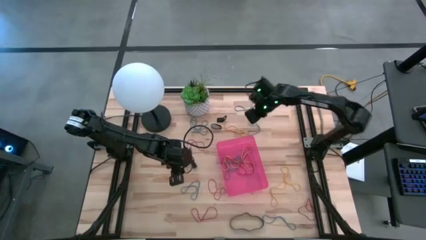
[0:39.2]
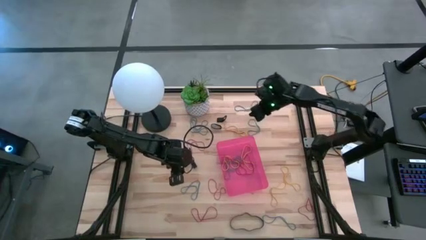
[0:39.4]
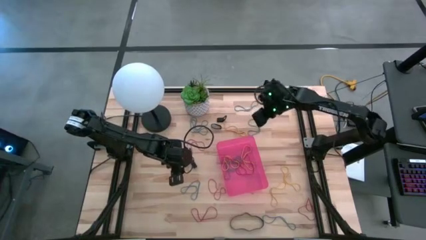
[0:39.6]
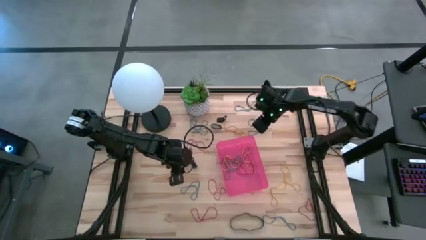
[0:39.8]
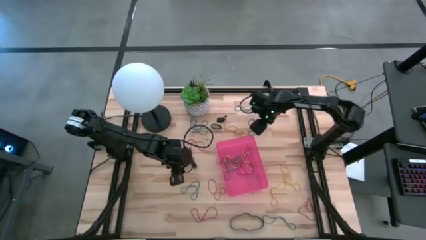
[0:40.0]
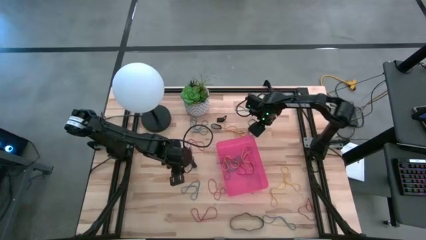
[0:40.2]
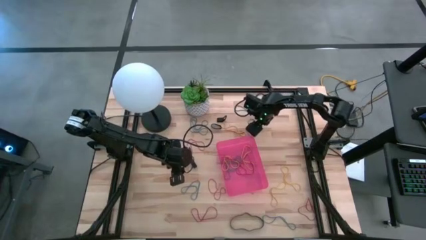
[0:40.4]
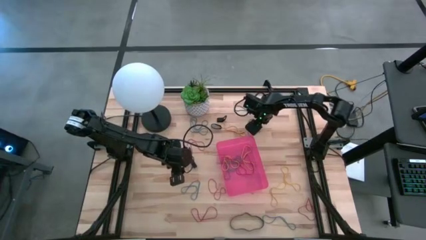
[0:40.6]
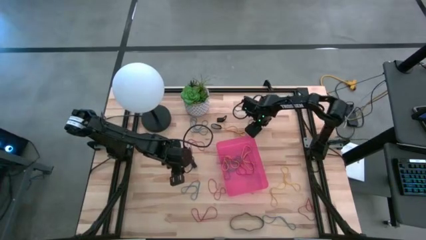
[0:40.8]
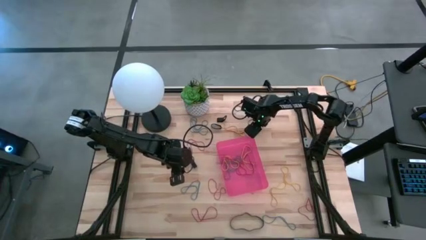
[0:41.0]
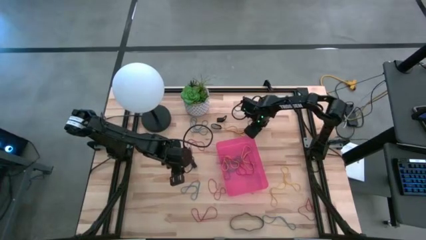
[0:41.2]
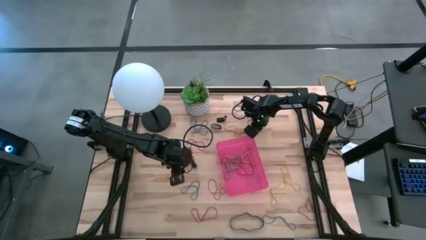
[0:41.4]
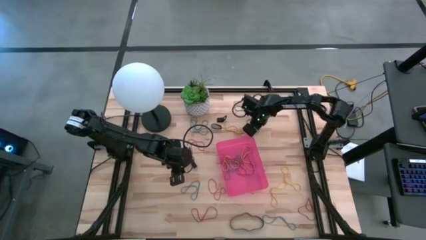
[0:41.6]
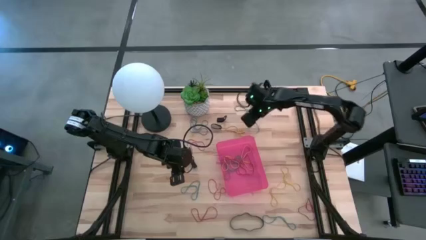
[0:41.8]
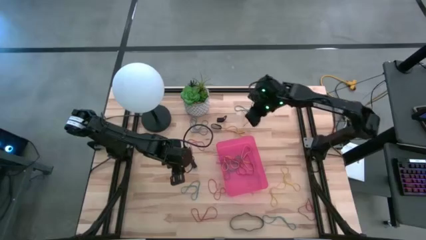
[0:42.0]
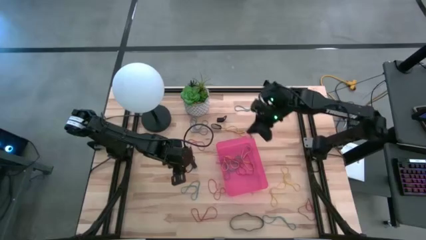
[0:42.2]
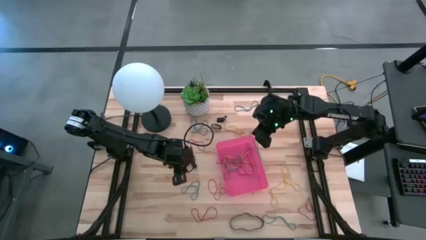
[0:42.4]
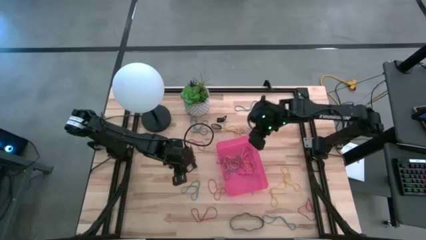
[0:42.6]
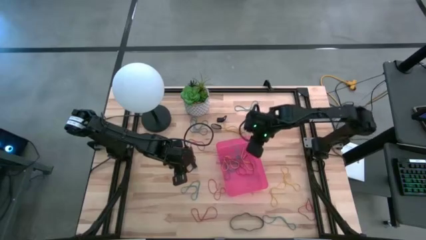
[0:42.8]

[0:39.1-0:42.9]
Task: Pick and place rubber bands into bin
Put the blue rubber band into the red bin

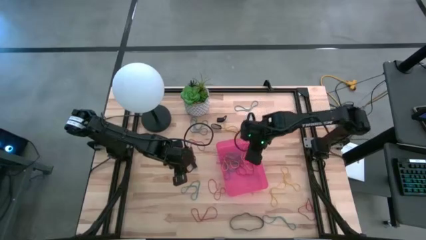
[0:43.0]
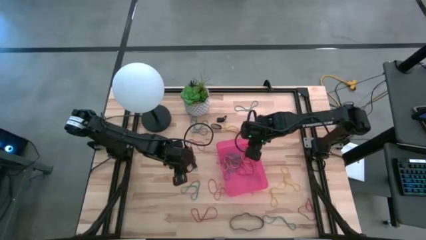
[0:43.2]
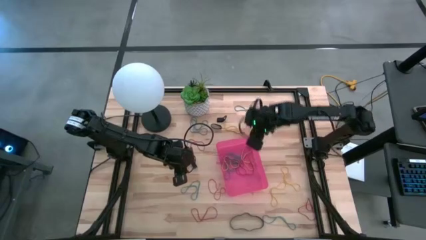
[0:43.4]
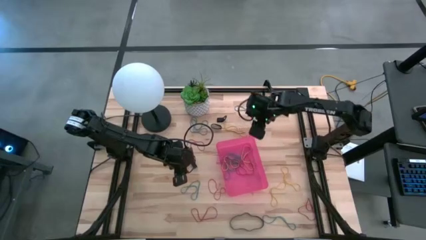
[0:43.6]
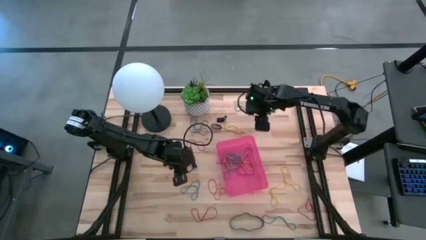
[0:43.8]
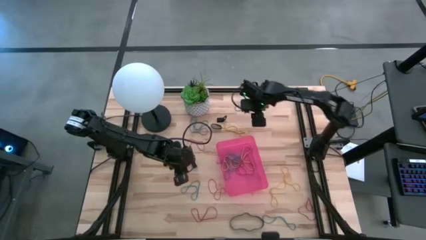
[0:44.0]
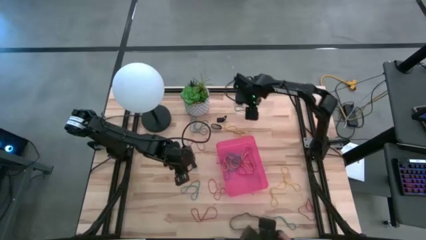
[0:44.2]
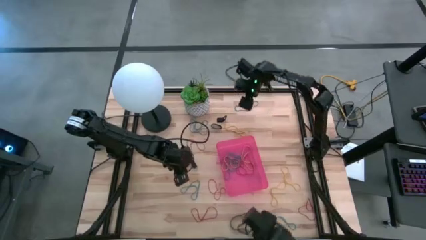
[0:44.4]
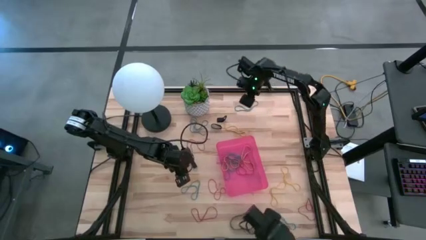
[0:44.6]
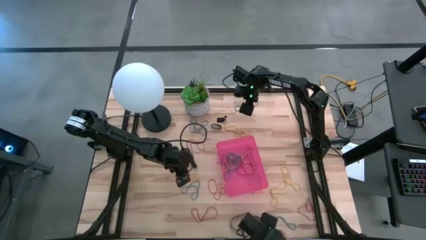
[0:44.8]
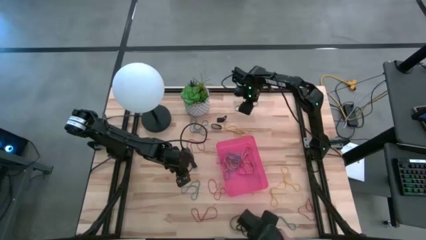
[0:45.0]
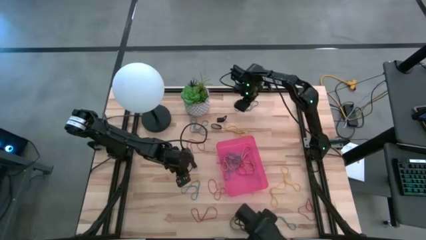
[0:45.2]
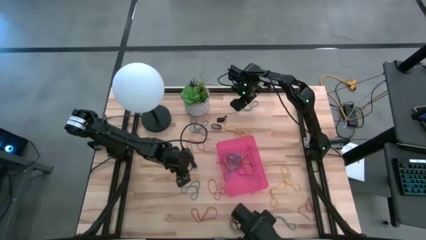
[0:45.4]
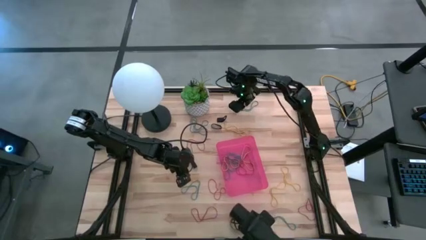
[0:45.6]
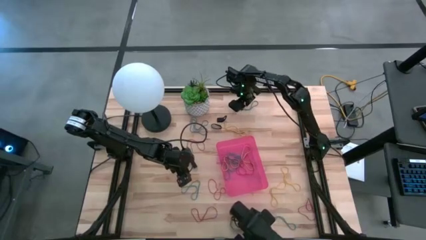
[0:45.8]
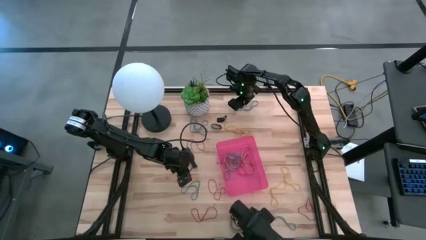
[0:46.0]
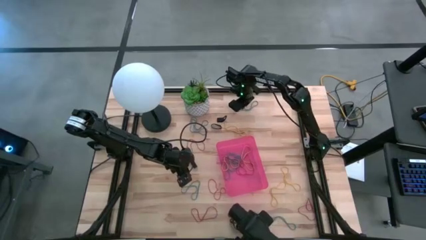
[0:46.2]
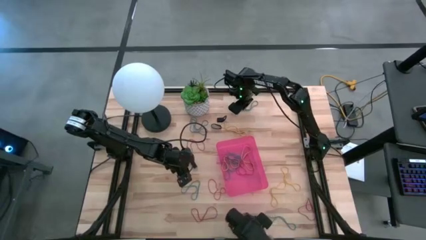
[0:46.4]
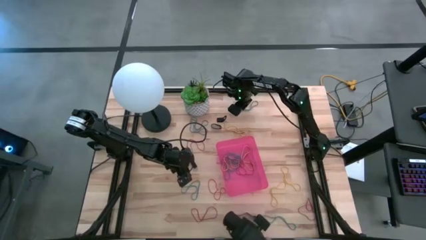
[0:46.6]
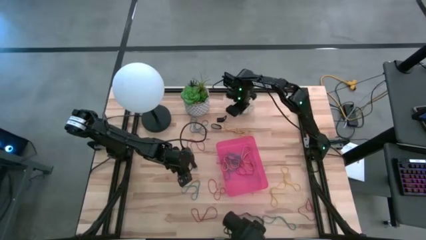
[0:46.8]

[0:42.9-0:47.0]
Put the blue rubber band into the red bin

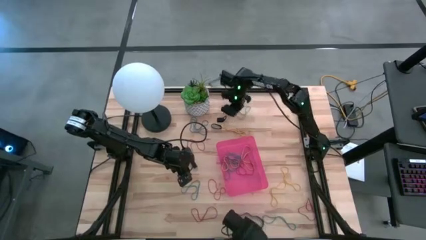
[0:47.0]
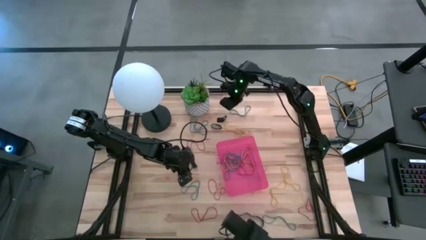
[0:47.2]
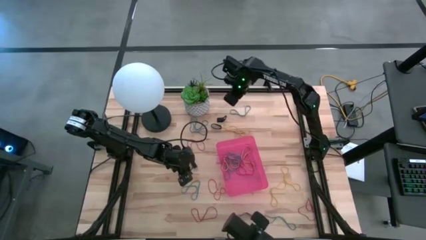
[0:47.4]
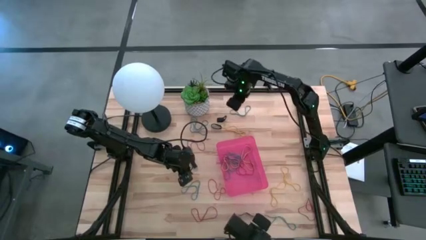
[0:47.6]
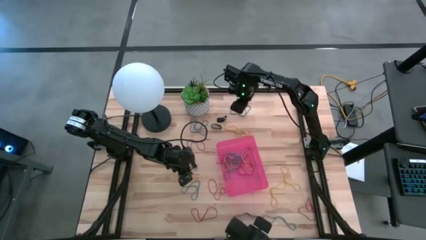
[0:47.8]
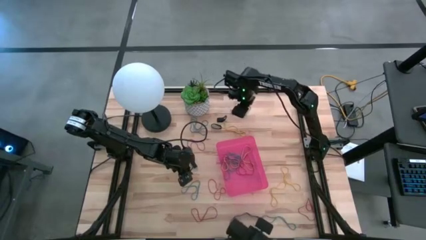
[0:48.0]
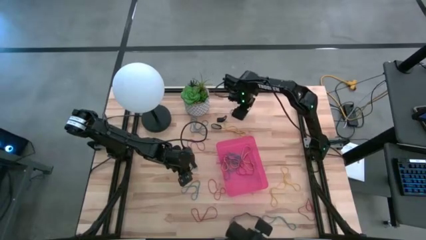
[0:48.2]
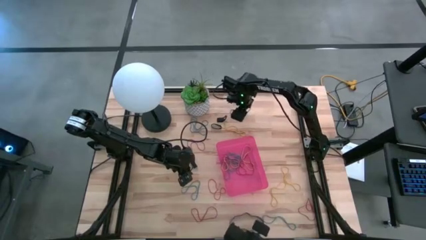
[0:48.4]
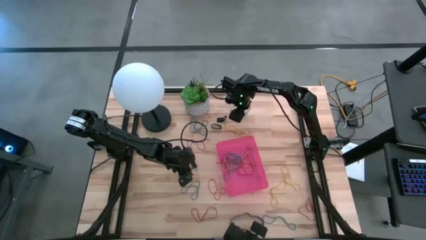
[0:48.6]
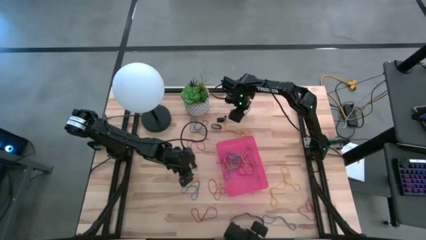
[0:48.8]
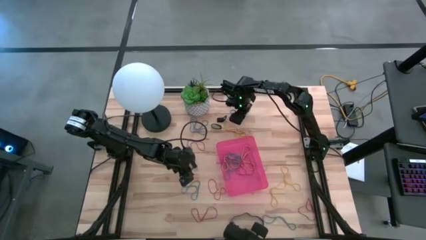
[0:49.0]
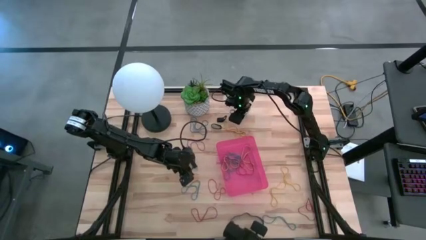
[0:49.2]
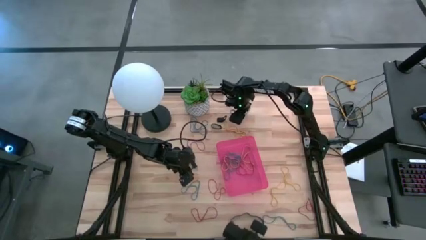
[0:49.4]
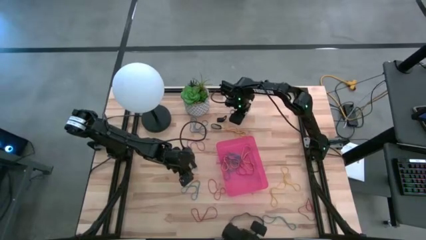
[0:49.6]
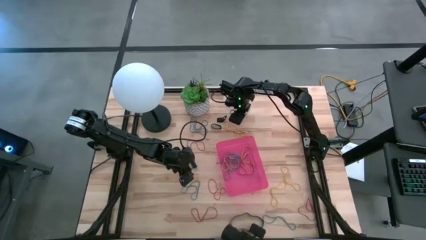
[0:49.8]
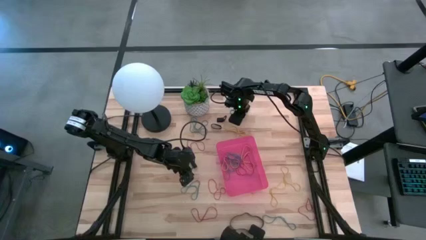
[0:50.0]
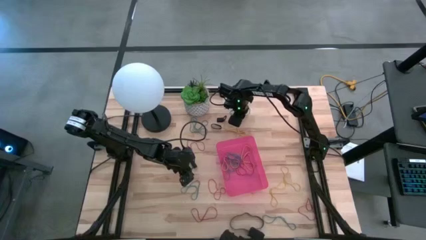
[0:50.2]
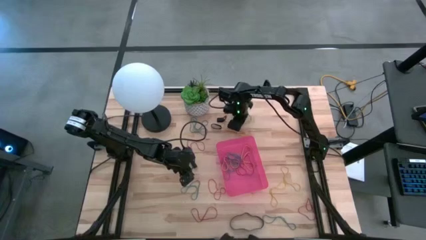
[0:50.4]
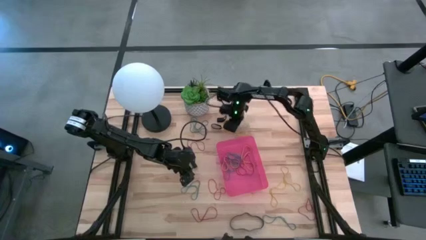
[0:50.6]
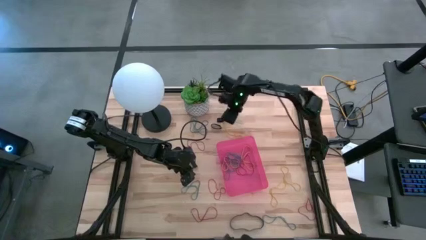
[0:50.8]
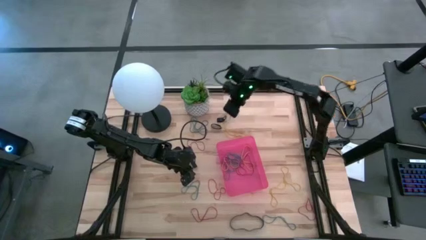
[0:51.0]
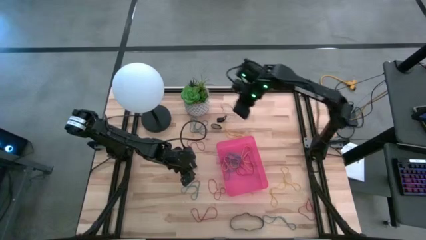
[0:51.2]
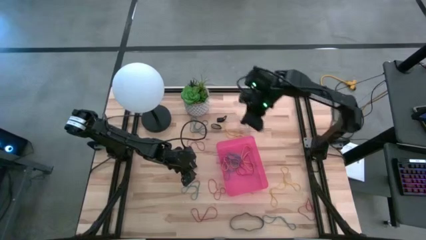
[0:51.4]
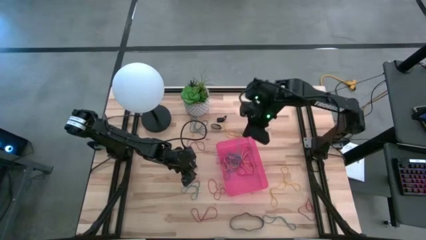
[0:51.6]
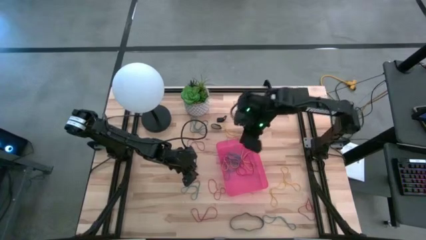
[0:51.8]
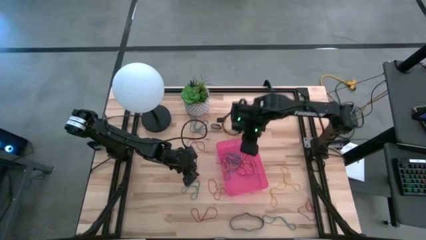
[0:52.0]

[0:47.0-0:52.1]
Put the blue rubber band into the red bin

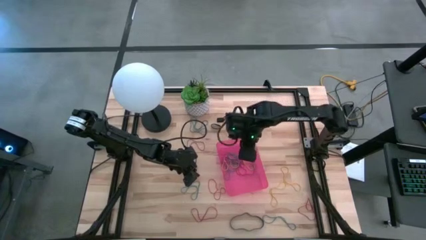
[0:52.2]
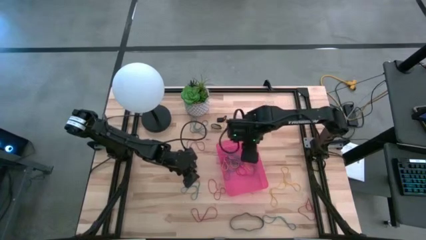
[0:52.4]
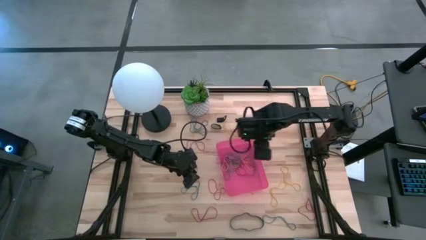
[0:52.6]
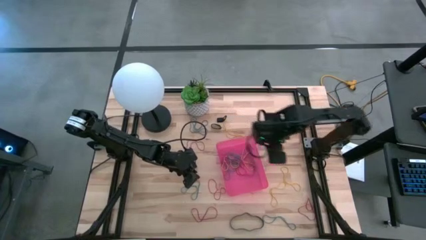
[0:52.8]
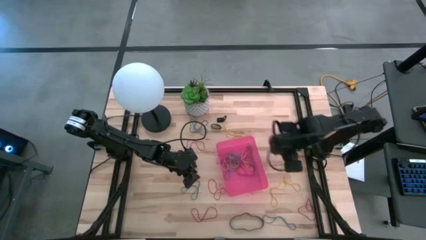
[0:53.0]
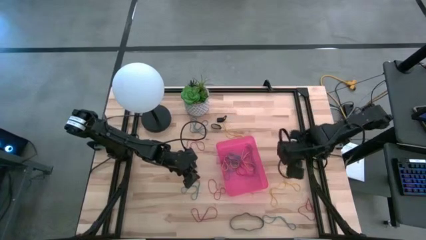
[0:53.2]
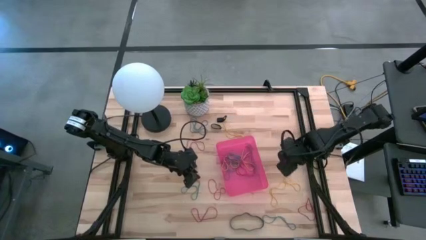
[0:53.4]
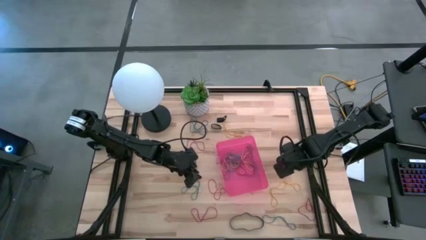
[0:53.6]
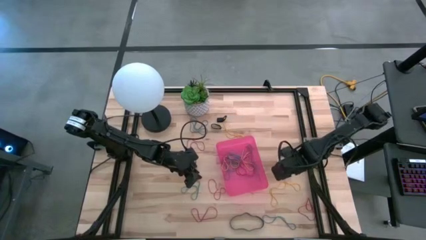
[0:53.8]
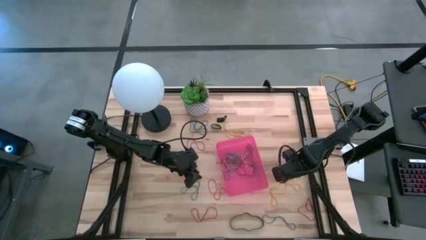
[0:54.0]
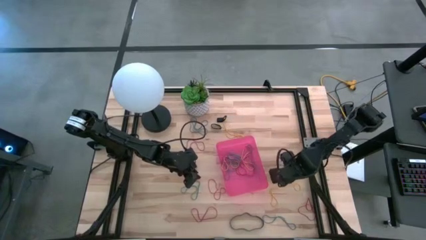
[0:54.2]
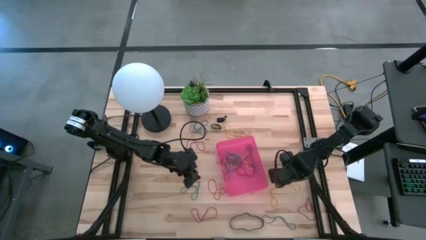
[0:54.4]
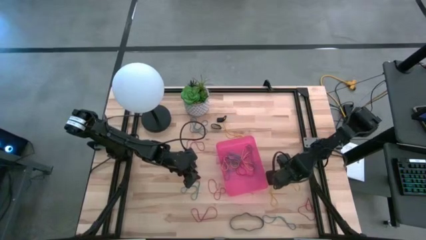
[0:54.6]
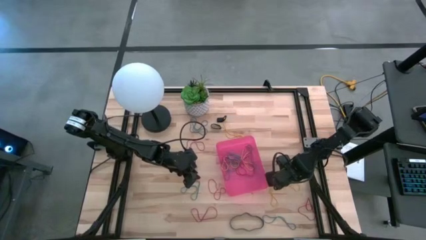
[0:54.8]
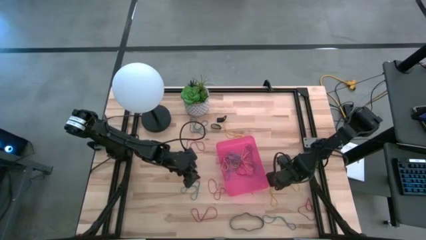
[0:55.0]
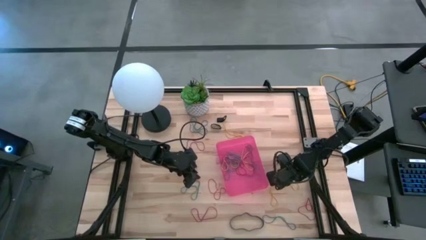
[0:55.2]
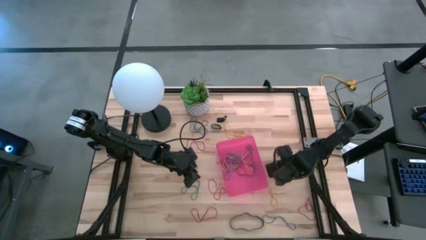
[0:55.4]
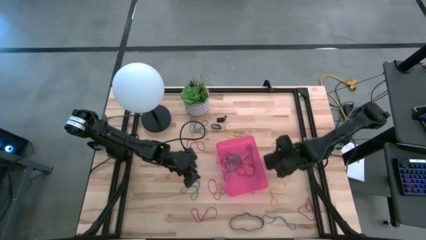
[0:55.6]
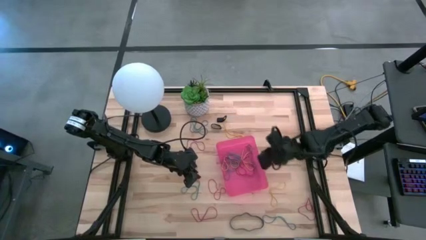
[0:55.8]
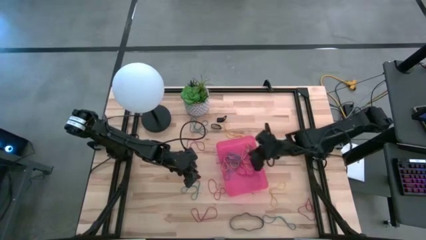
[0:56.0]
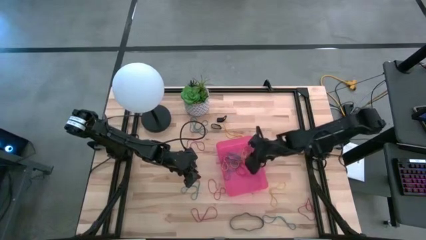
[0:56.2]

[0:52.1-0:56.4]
Put the bottom right yellow rubber band into the red bin
